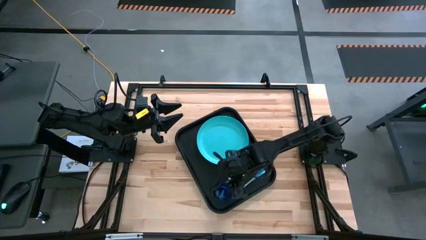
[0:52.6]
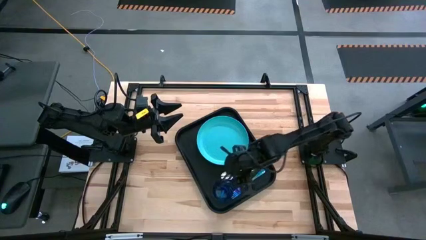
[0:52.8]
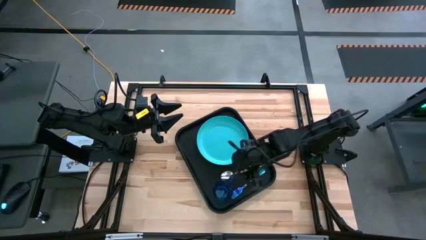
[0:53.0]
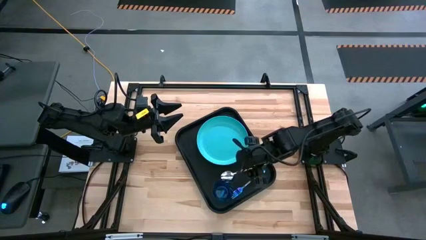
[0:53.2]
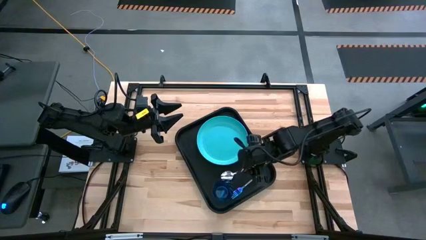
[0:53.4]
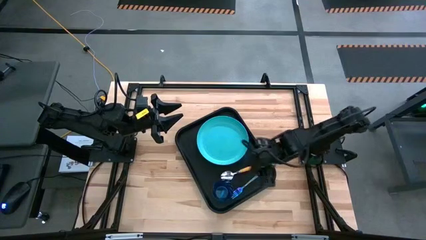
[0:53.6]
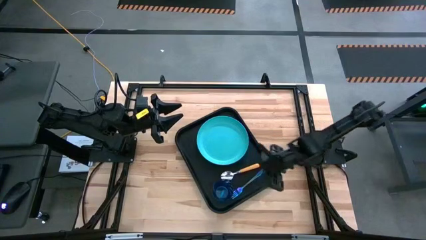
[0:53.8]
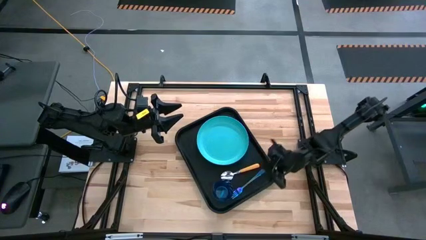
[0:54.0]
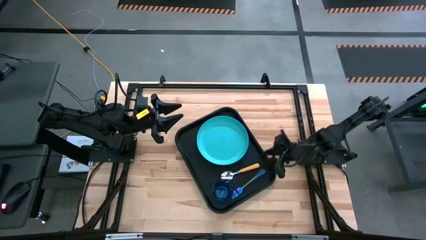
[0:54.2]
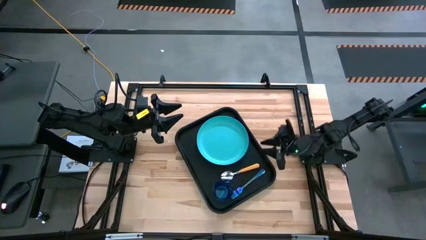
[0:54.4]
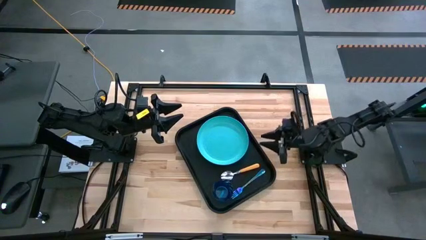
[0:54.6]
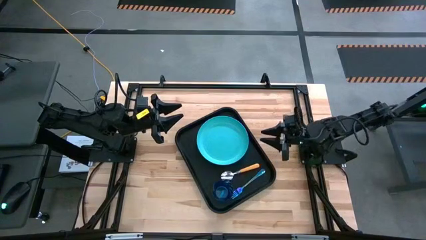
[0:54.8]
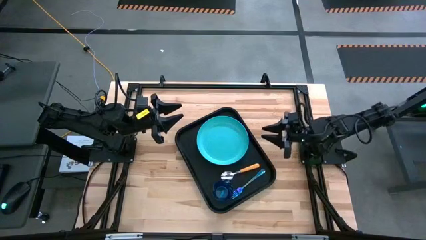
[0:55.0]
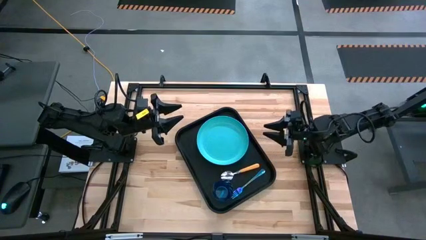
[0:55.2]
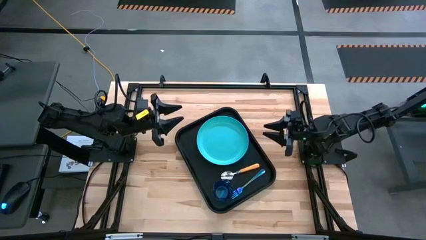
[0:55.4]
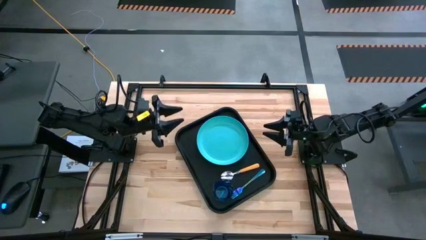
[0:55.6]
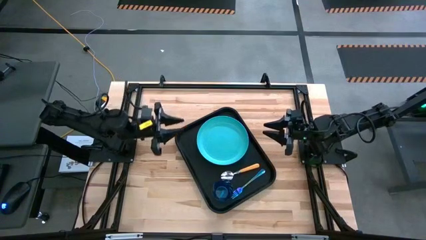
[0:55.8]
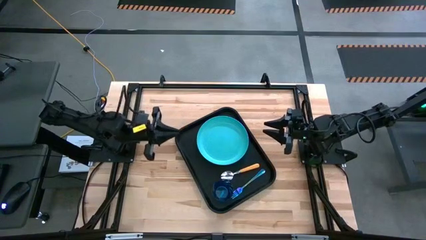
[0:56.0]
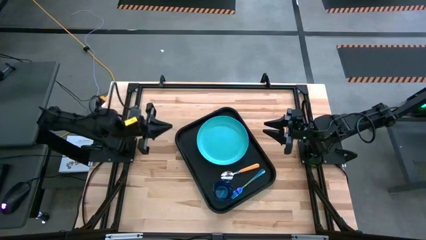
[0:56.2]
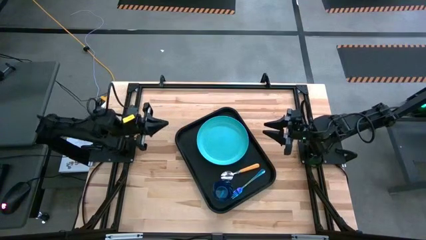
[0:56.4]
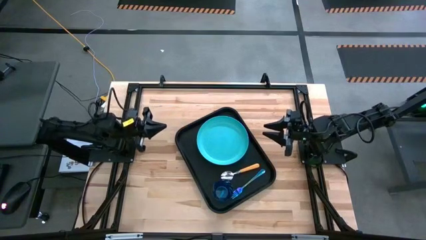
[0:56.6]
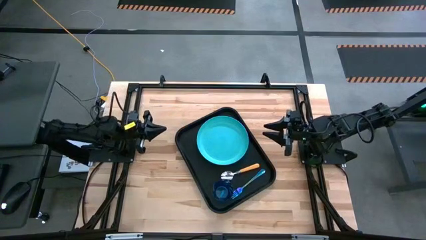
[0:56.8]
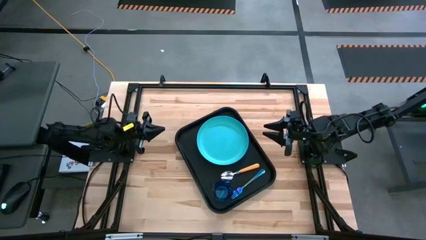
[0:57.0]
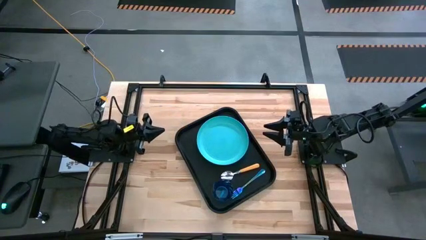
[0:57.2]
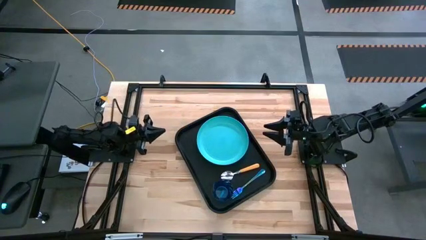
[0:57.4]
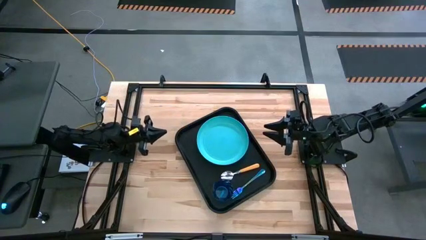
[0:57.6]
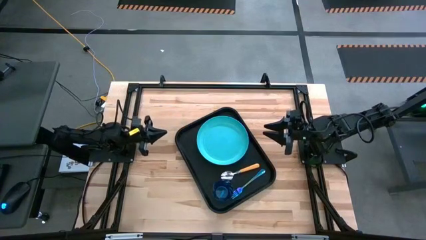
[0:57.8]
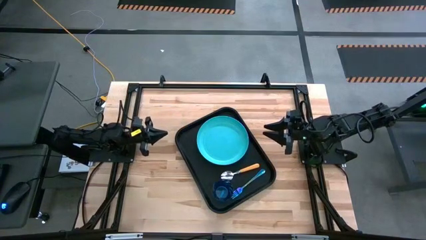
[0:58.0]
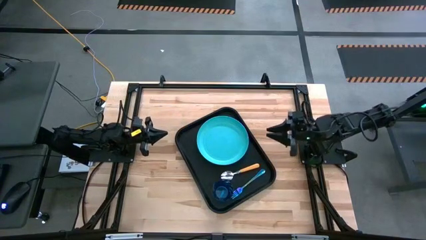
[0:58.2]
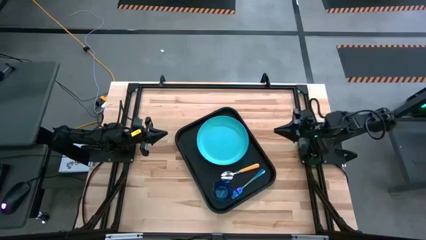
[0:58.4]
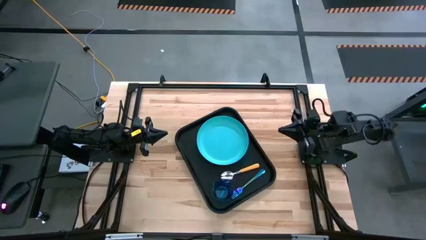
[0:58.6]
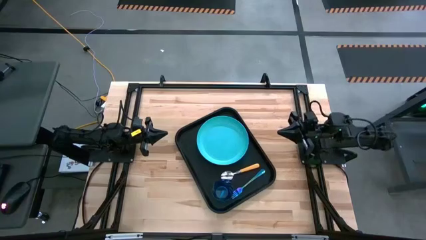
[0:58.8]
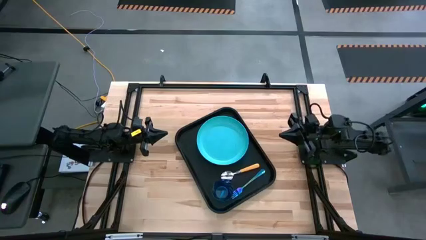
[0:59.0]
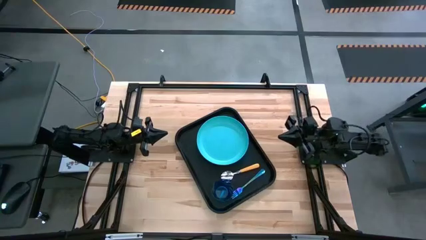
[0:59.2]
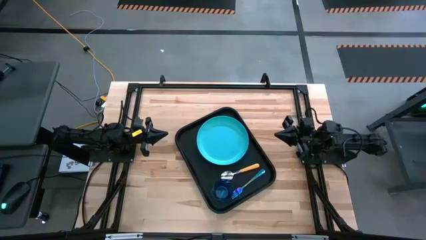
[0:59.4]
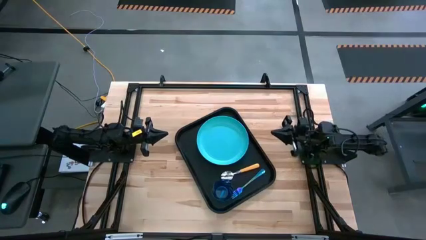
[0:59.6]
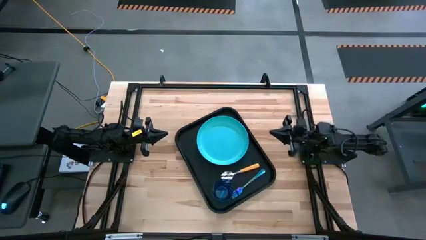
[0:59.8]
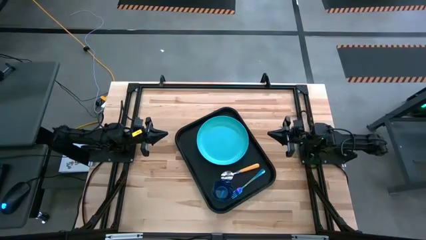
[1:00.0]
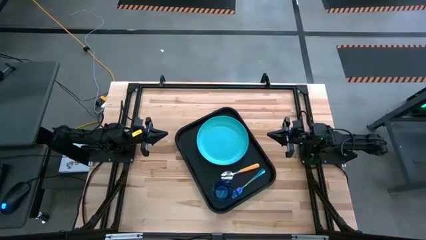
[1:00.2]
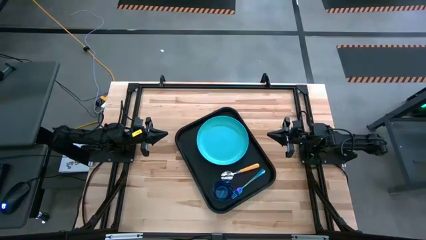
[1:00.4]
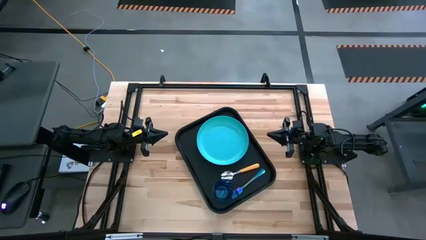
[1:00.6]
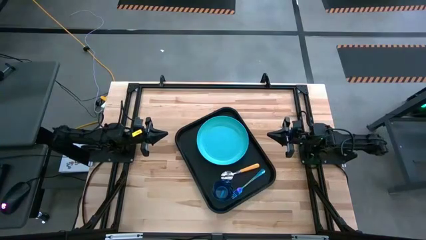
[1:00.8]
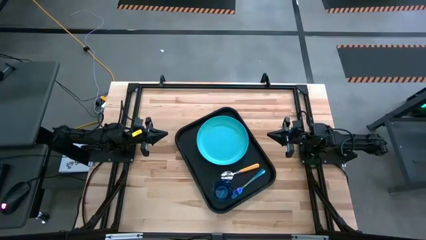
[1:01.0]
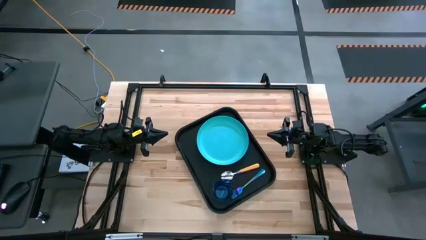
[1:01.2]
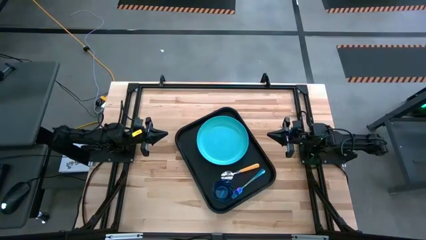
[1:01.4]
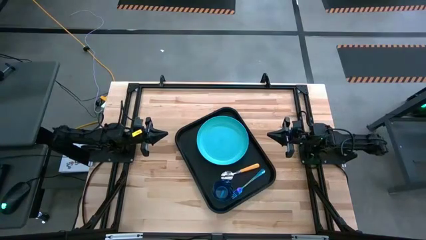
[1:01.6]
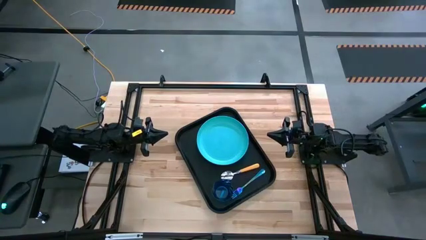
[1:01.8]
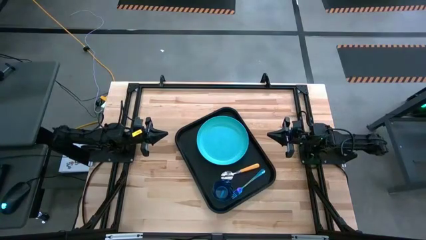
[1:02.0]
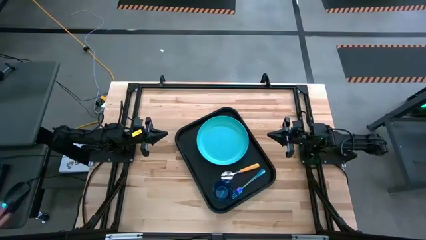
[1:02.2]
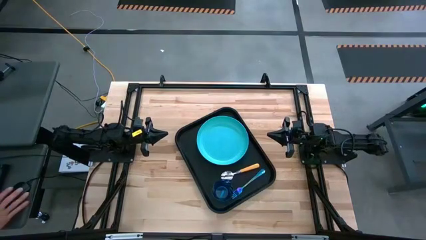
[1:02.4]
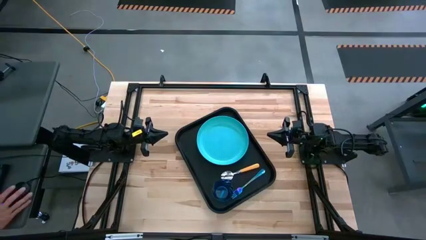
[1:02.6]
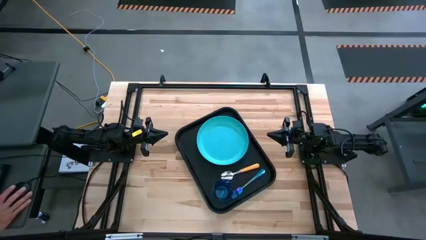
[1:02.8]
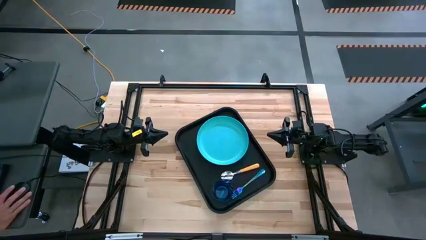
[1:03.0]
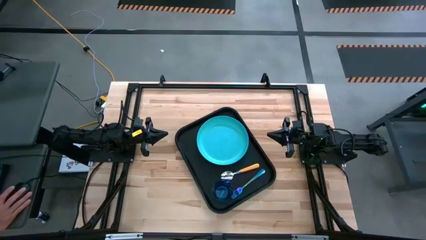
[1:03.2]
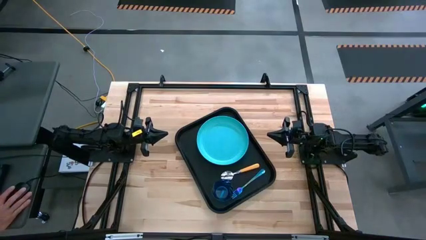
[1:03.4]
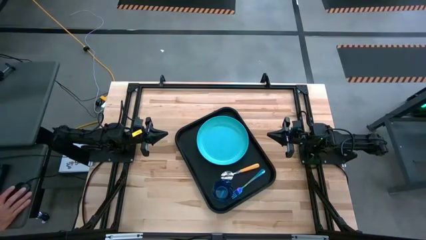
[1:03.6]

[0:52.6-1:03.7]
Task: Pick and place plate/cup/fork/spoon on tray
Return to Home Position
